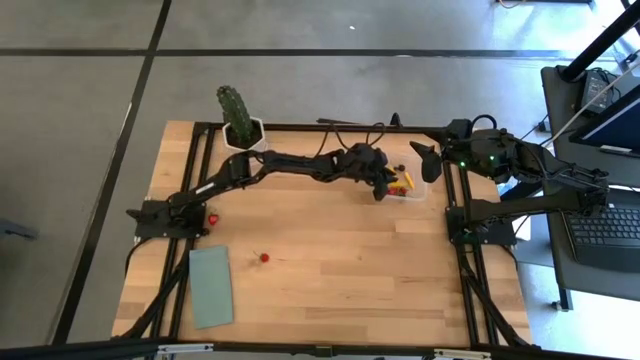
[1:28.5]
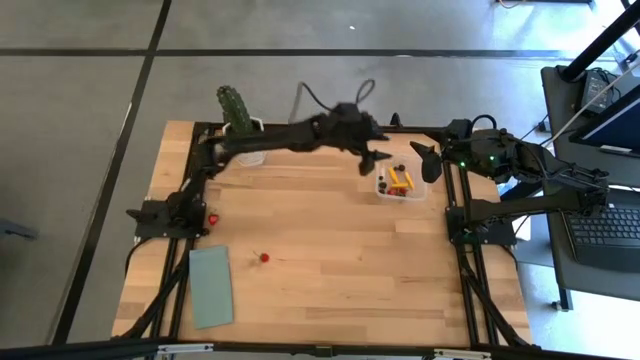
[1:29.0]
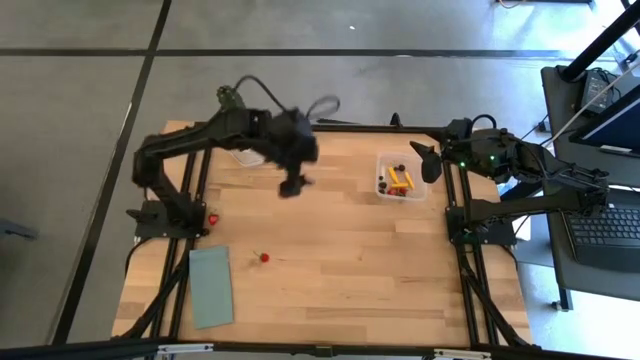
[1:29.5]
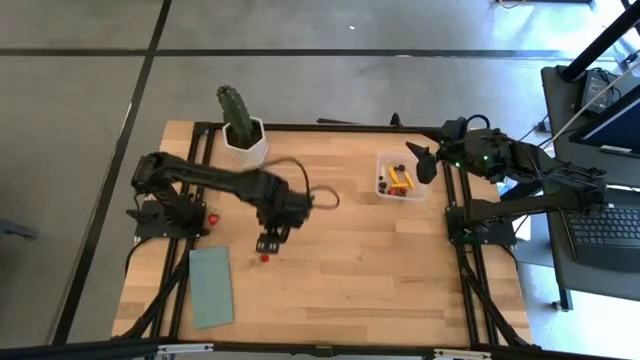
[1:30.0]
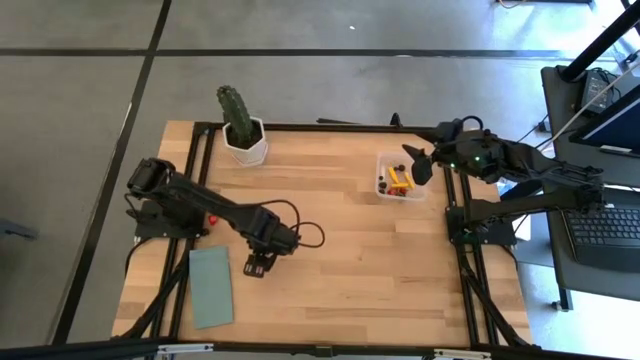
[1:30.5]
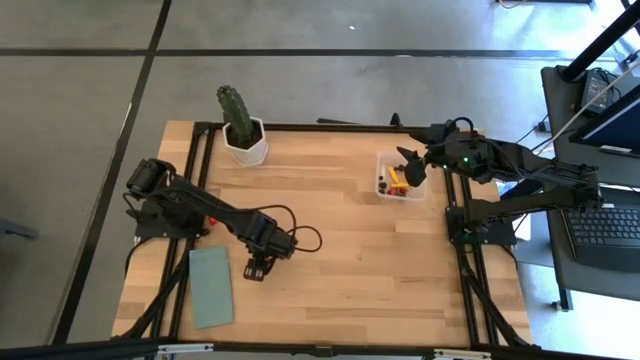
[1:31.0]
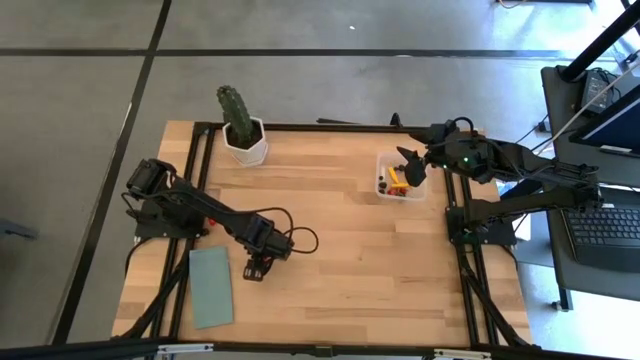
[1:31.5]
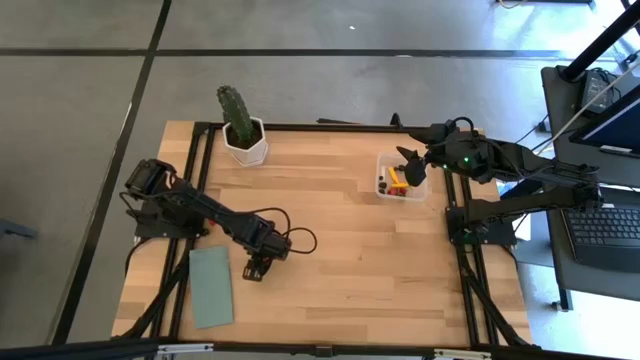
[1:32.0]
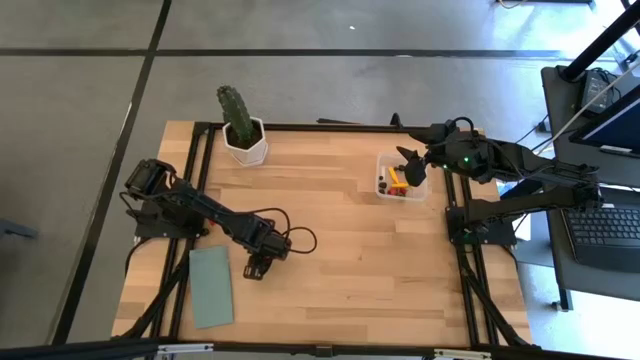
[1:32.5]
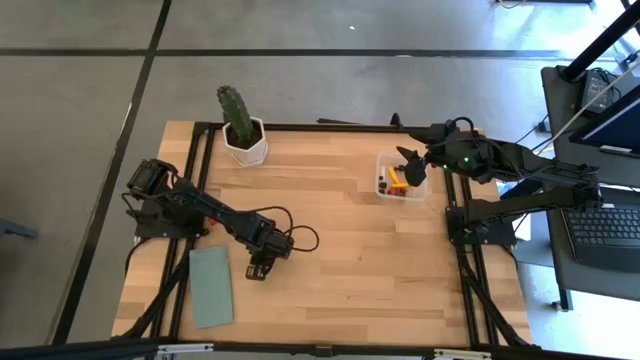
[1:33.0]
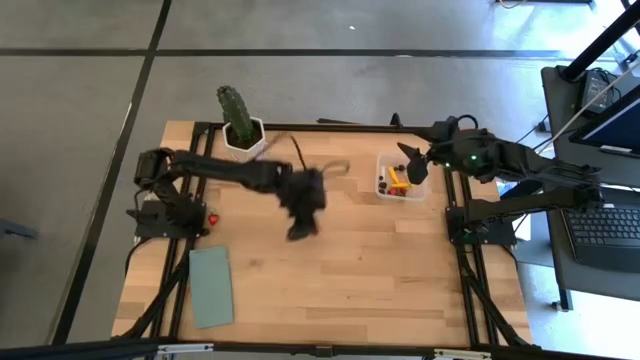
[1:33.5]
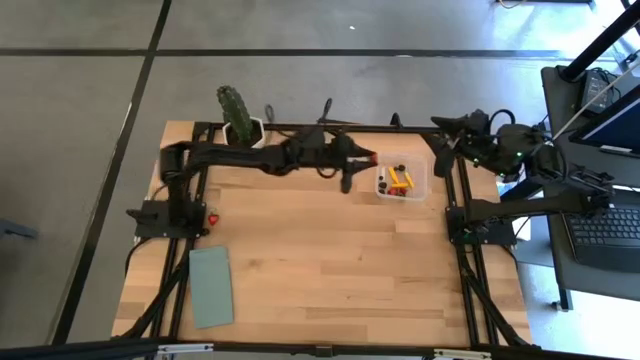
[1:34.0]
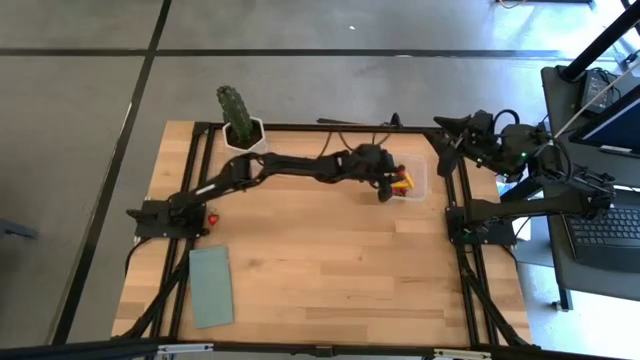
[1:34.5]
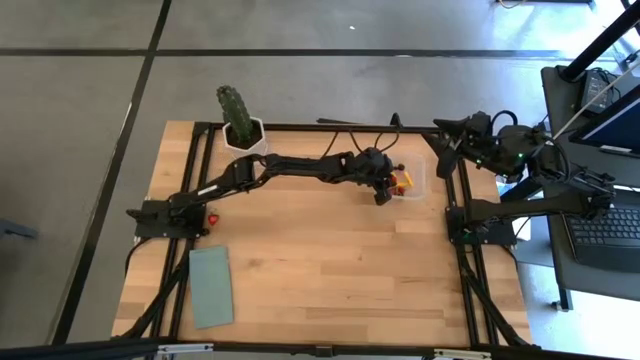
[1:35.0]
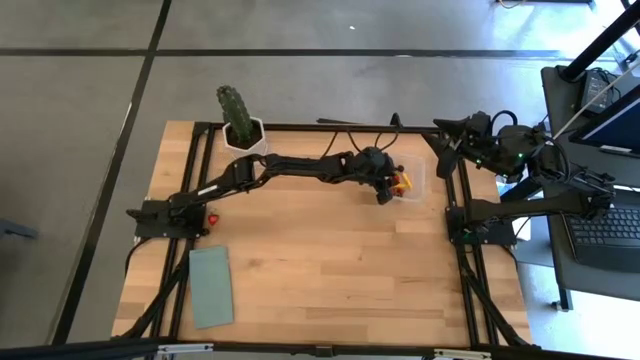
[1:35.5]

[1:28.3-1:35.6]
Task: Pick and placing Produce into tupperware
Put the bottom red strawberry into the transparent bin

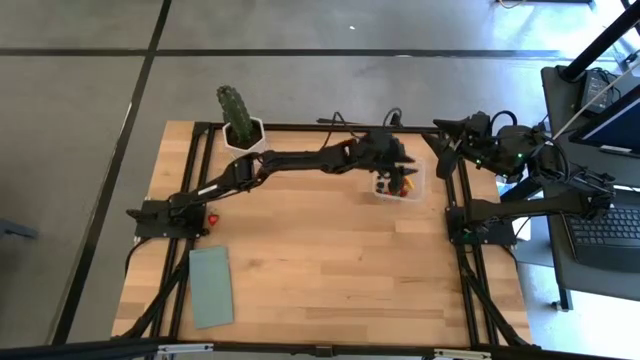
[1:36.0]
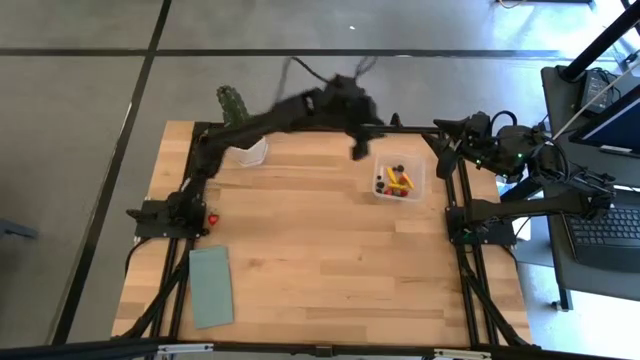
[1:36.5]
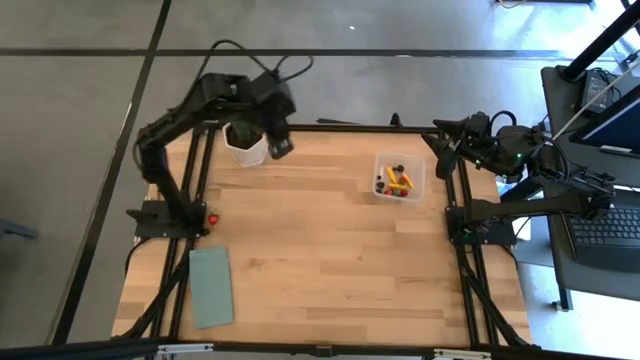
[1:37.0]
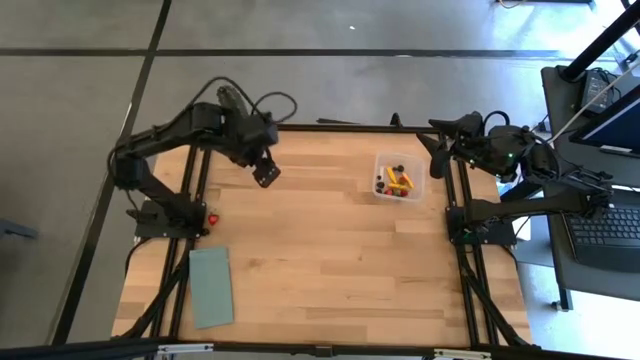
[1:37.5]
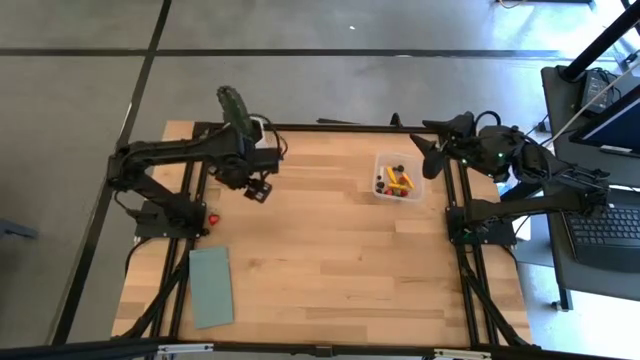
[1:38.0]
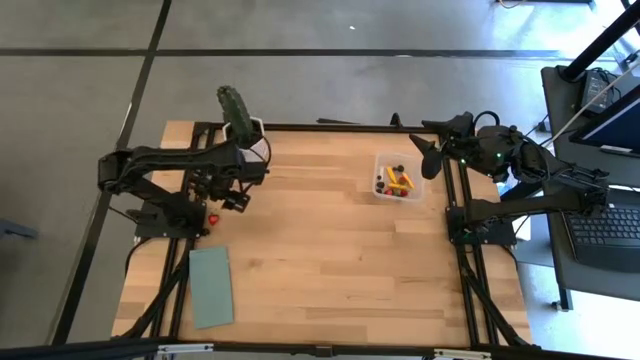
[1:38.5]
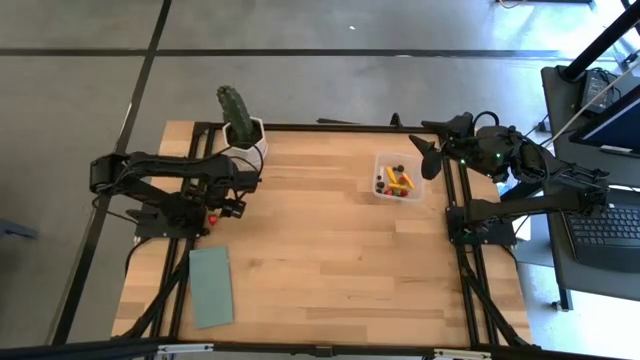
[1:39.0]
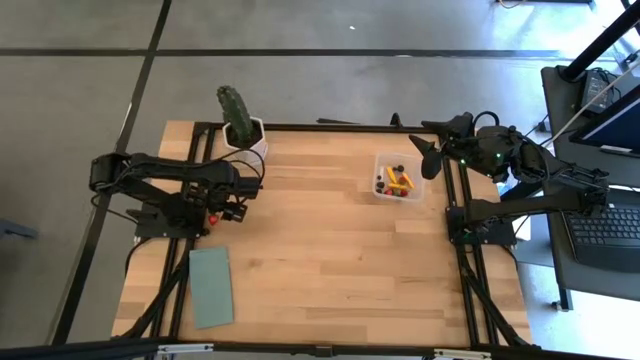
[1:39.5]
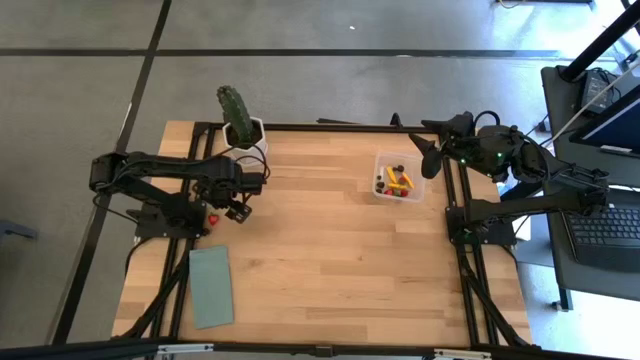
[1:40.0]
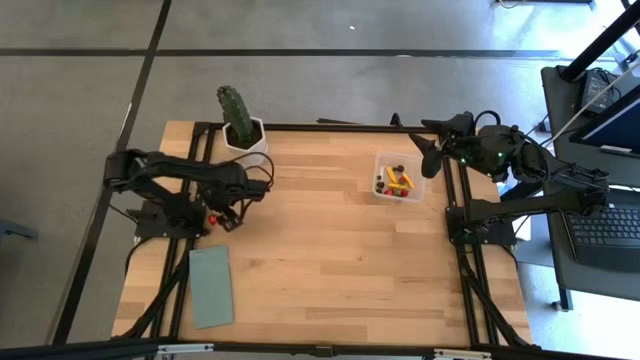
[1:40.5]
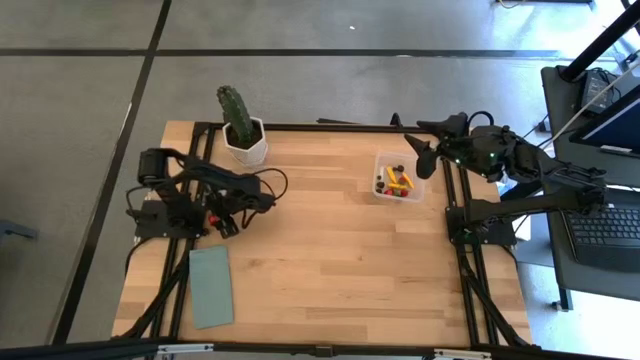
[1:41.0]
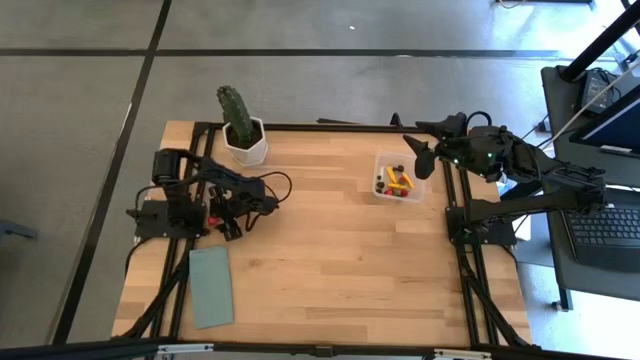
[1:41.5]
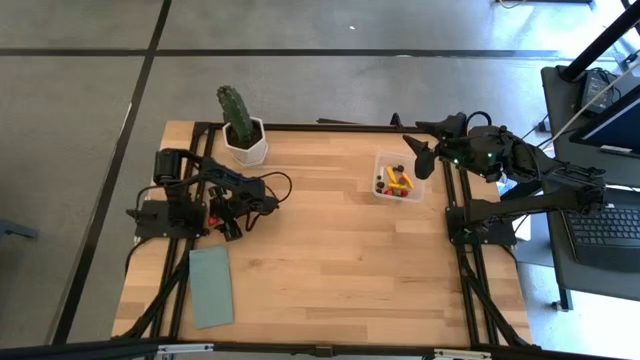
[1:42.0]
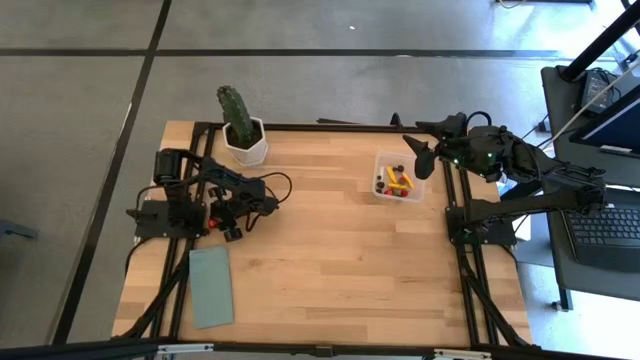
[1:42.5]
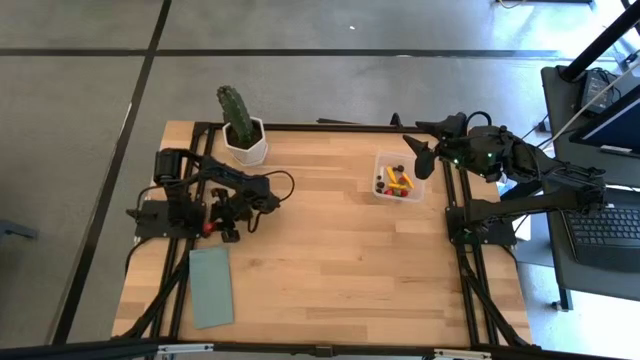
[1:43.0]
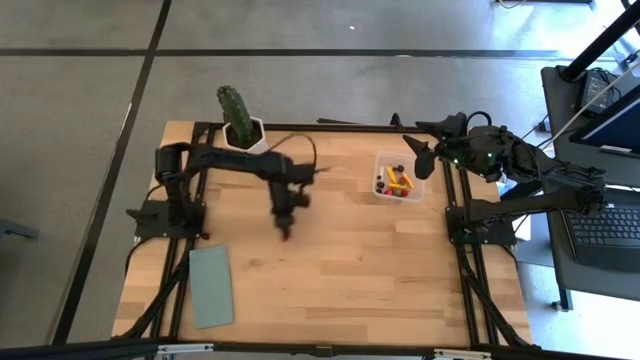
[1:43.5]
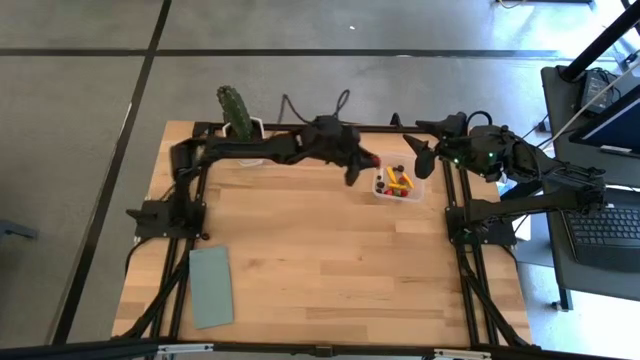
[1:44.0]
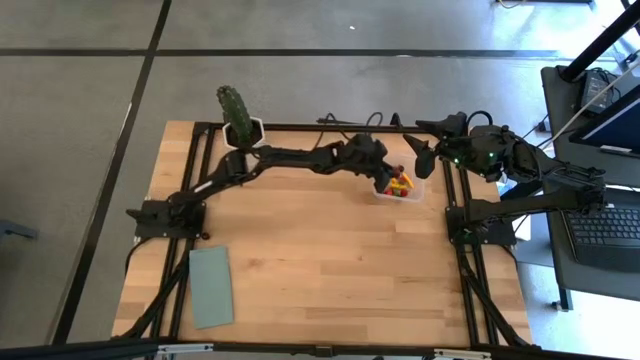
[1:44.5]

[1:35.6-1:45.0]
Put the red strawberry into the transparent bin

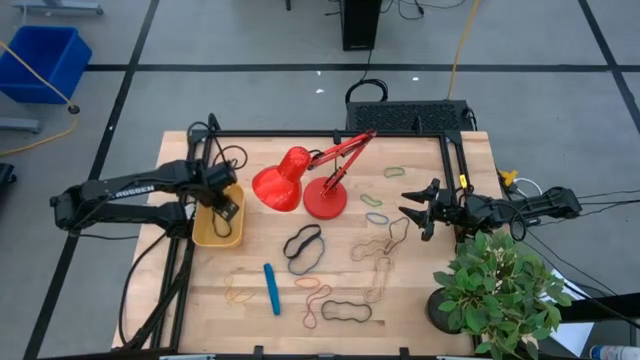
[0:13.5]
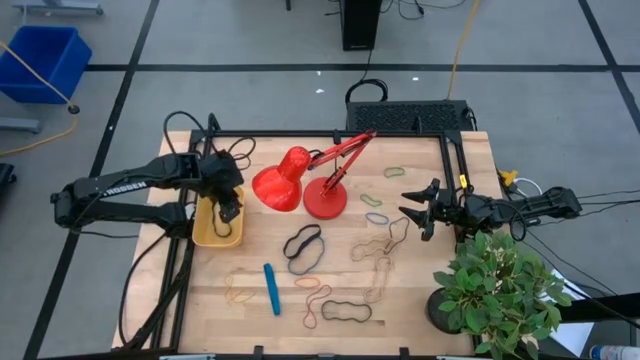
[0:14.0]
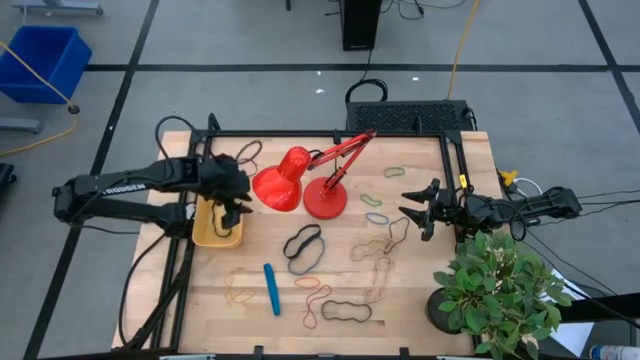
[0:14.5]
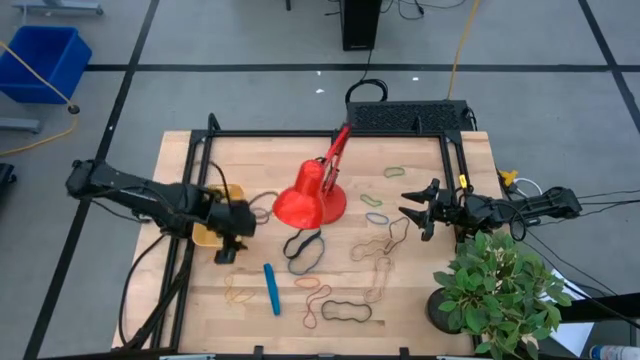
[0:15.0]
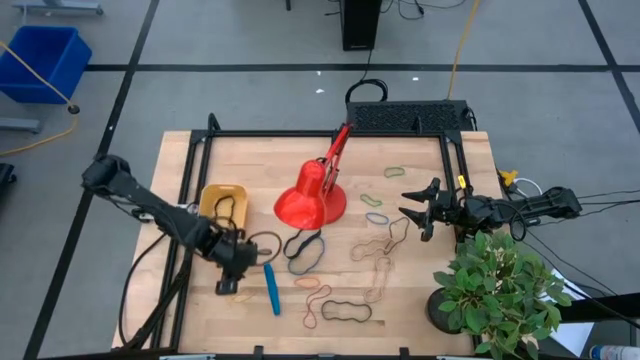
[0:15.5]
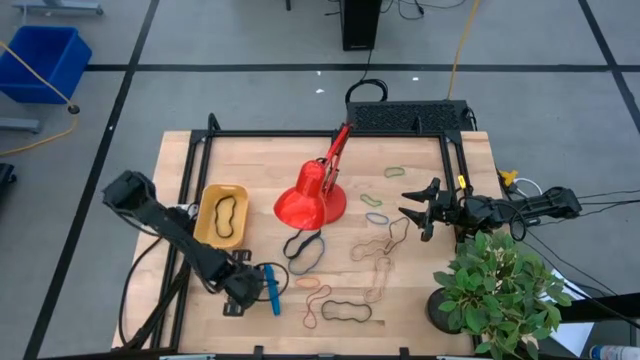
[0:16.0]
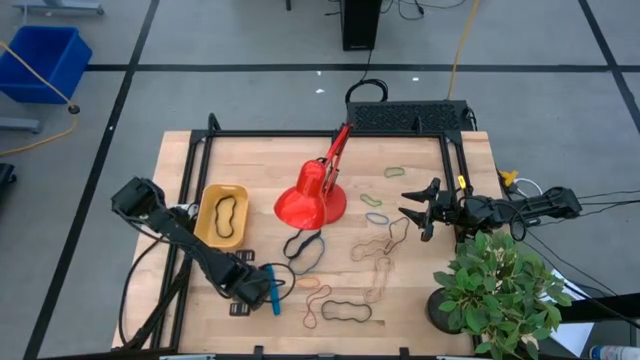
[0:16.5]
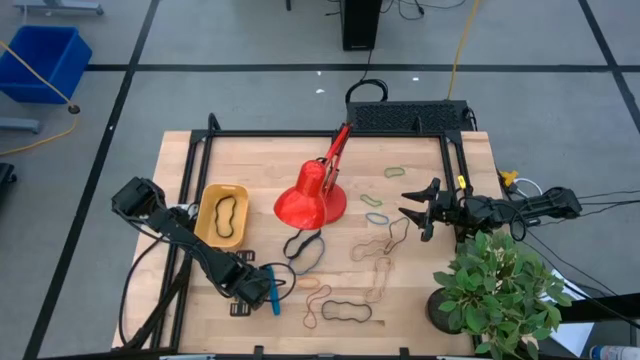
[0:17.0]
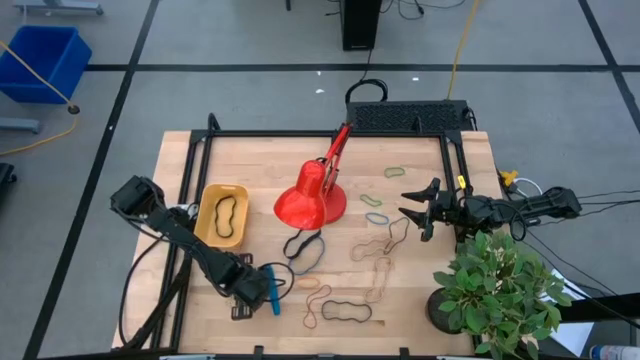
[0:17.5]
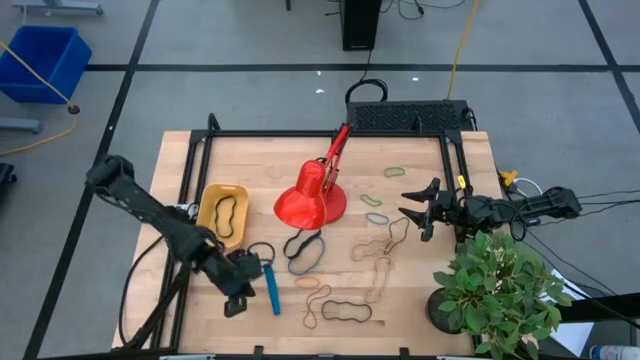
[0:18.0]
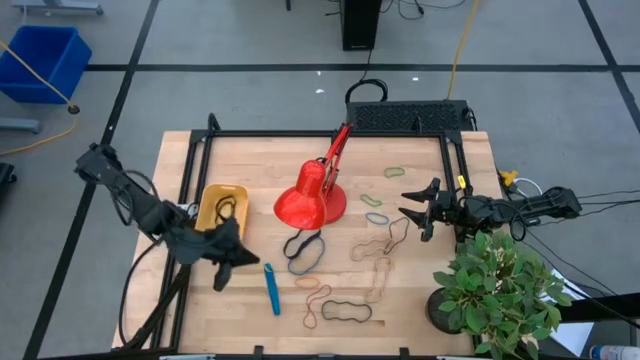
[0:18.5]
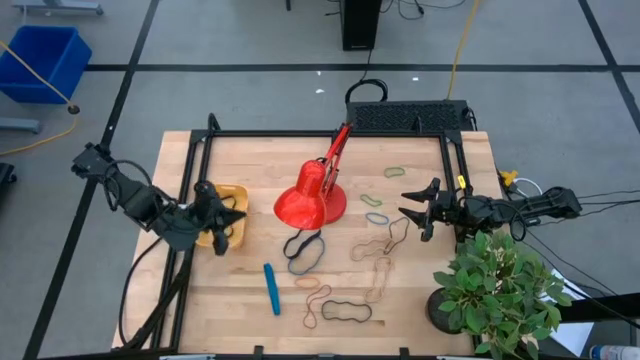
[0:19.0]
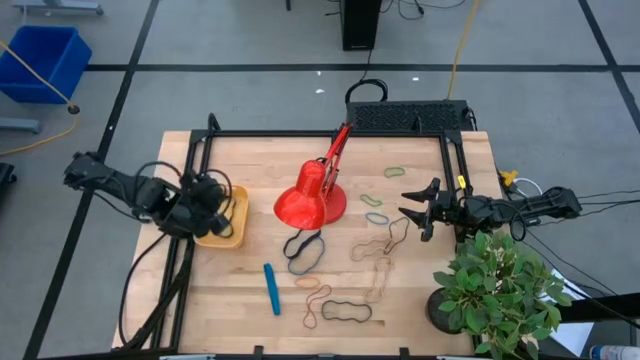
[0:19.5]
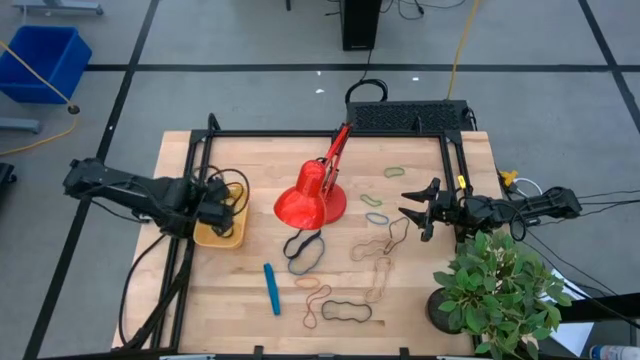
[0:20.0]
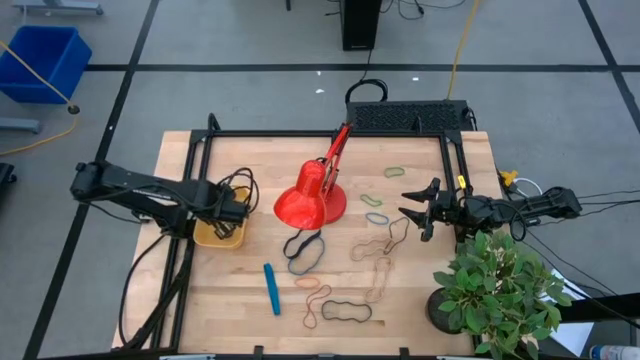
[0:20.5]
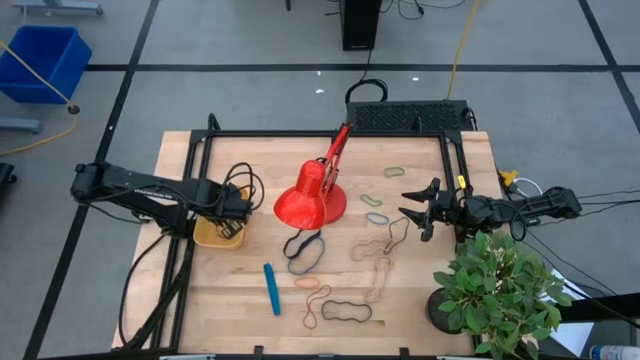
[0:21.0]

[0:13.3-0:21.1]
Task: Pick and place rubber bands into bin
Put the left yellow rubber band into the yellow bin
